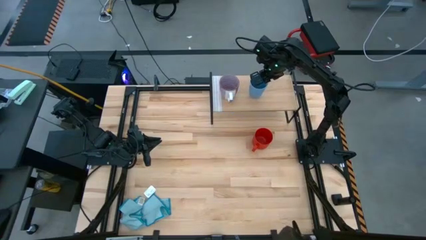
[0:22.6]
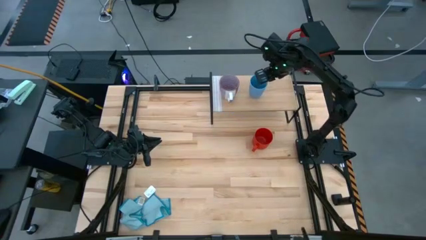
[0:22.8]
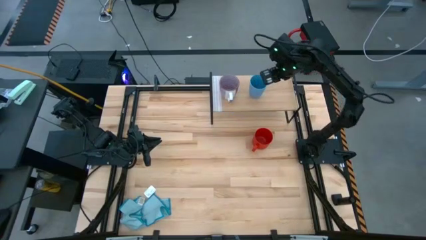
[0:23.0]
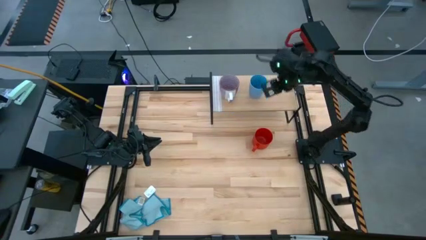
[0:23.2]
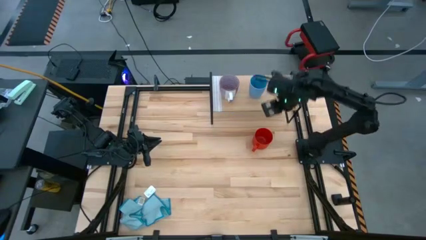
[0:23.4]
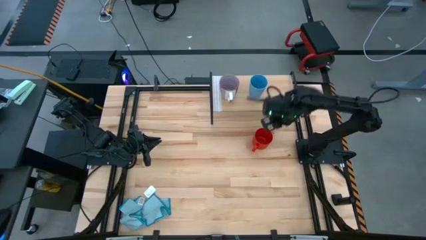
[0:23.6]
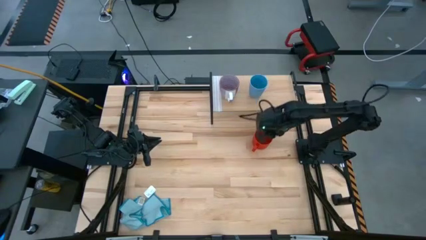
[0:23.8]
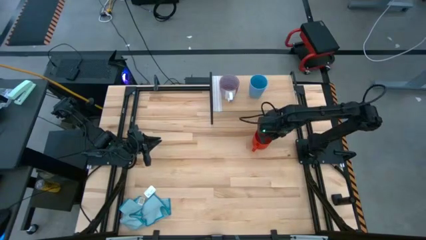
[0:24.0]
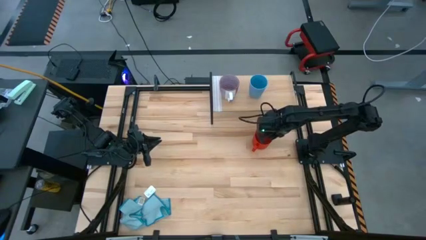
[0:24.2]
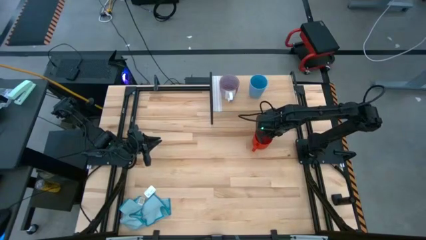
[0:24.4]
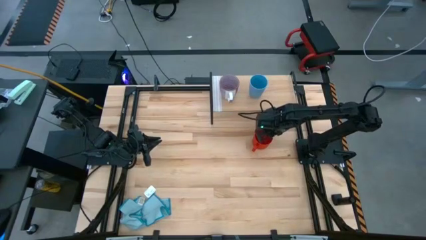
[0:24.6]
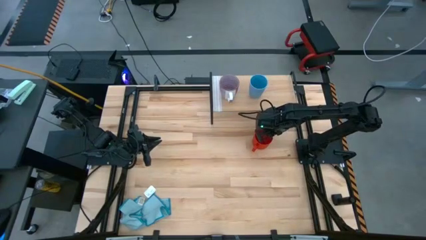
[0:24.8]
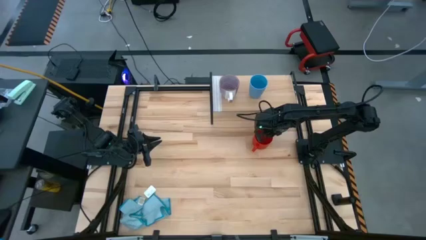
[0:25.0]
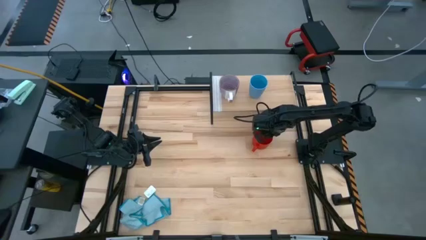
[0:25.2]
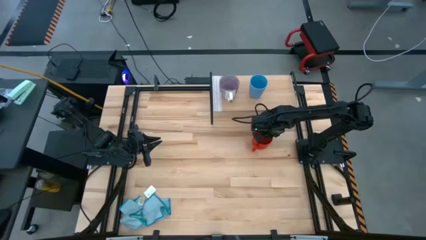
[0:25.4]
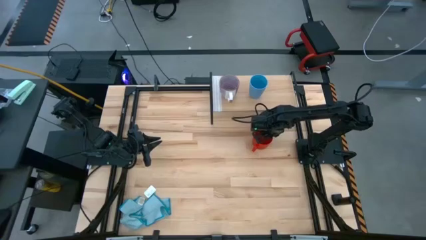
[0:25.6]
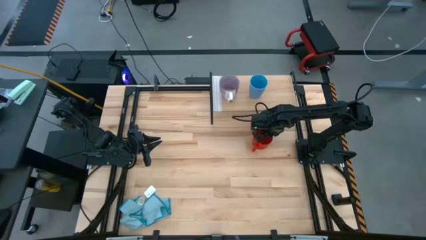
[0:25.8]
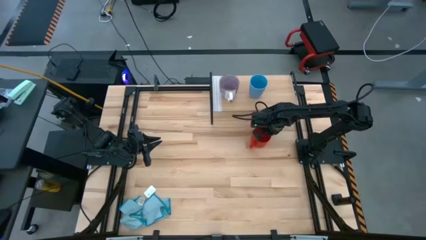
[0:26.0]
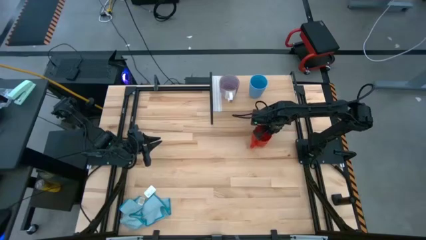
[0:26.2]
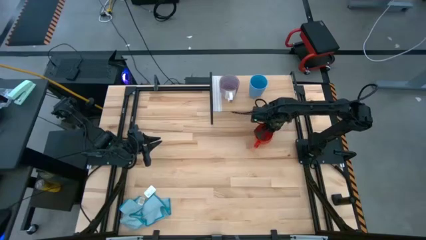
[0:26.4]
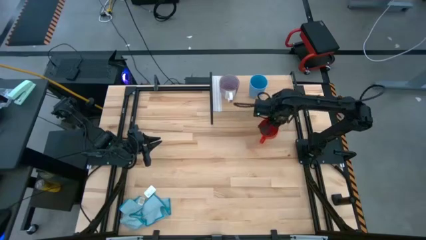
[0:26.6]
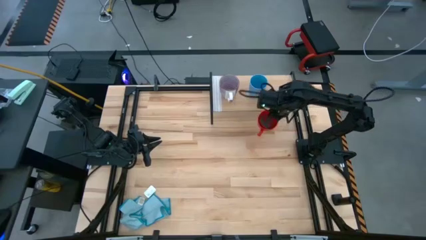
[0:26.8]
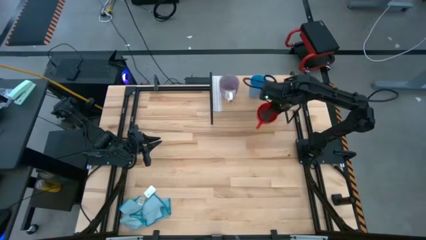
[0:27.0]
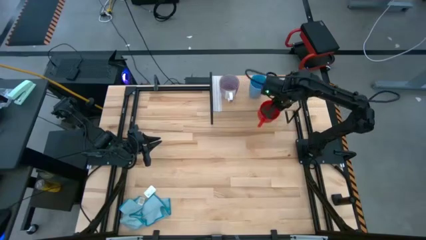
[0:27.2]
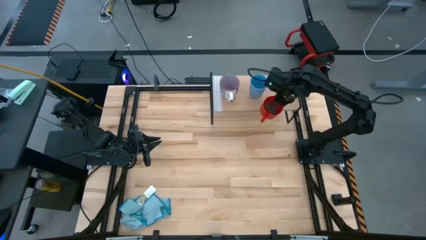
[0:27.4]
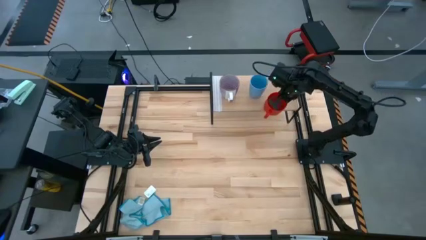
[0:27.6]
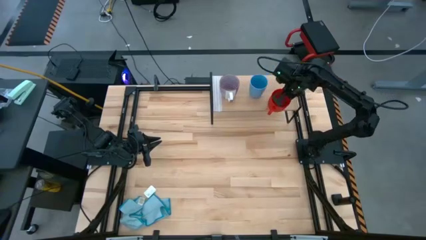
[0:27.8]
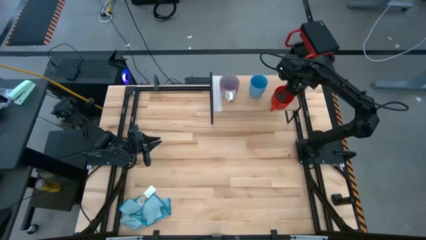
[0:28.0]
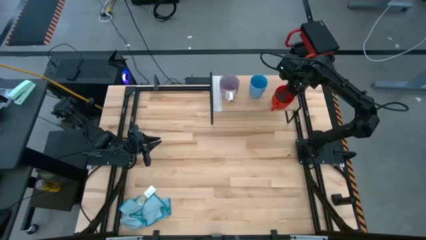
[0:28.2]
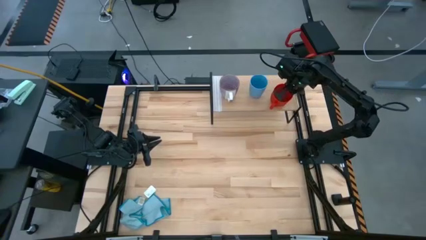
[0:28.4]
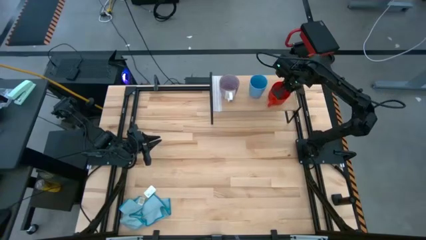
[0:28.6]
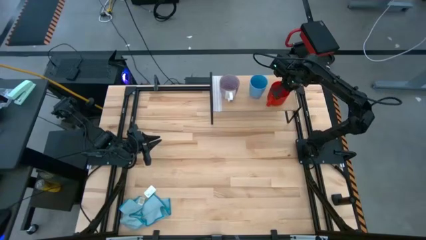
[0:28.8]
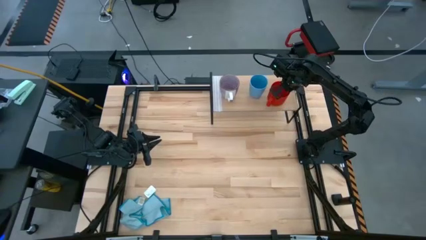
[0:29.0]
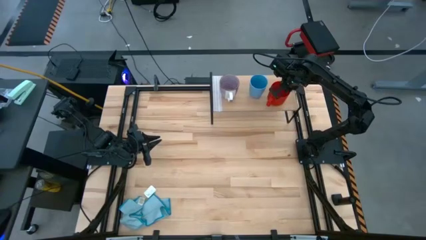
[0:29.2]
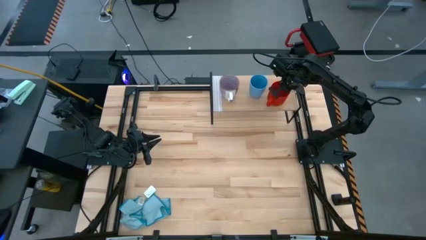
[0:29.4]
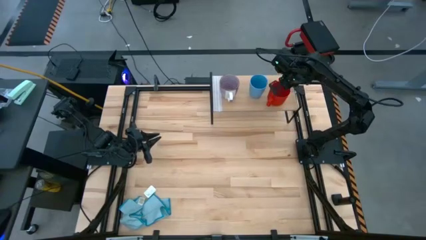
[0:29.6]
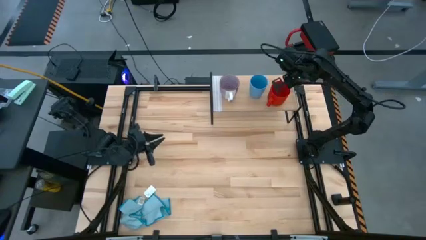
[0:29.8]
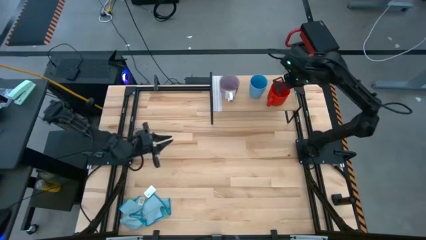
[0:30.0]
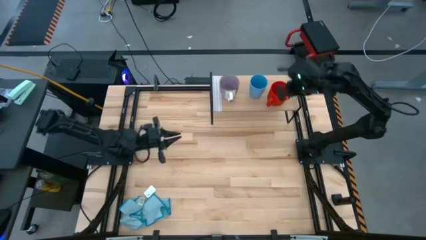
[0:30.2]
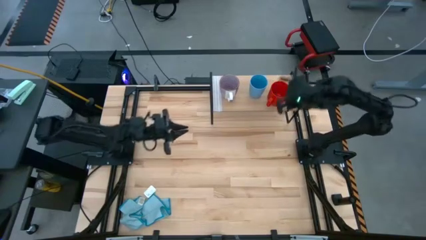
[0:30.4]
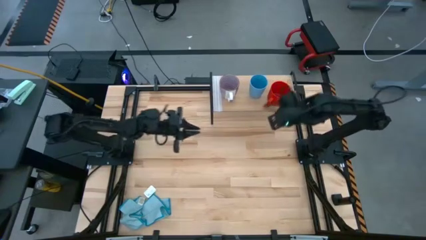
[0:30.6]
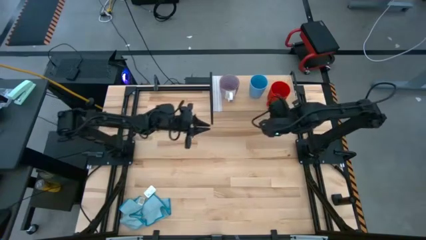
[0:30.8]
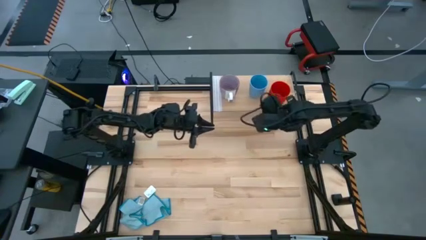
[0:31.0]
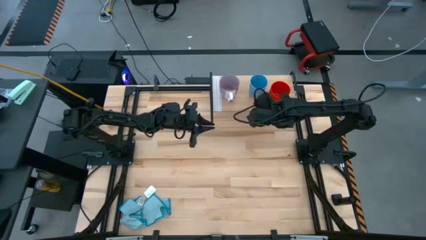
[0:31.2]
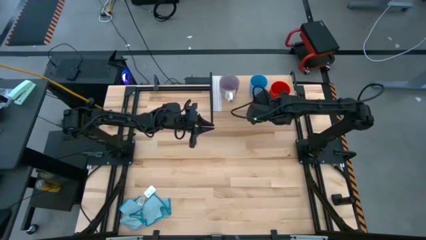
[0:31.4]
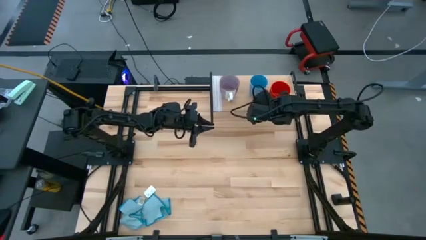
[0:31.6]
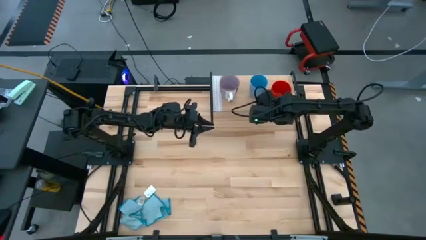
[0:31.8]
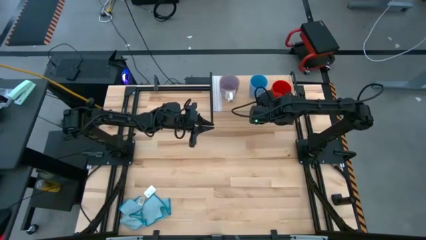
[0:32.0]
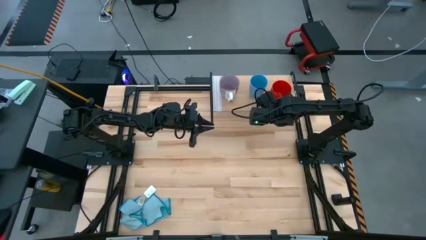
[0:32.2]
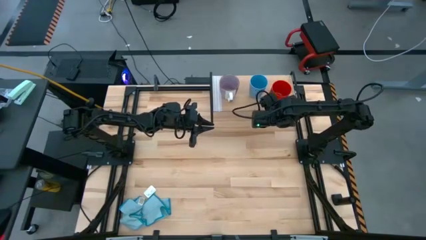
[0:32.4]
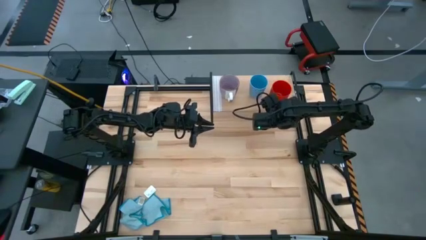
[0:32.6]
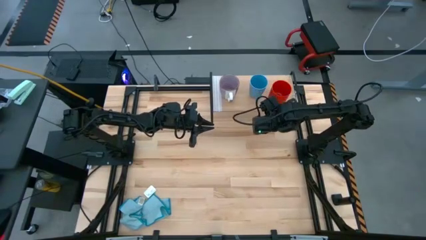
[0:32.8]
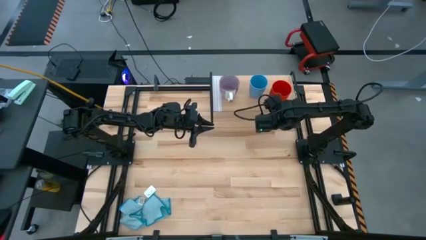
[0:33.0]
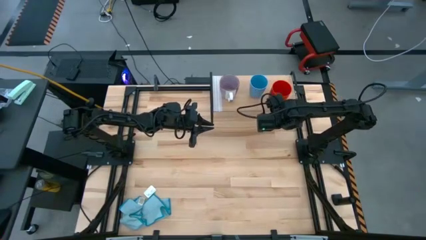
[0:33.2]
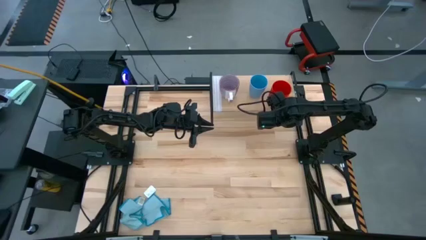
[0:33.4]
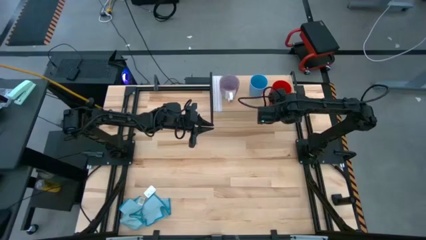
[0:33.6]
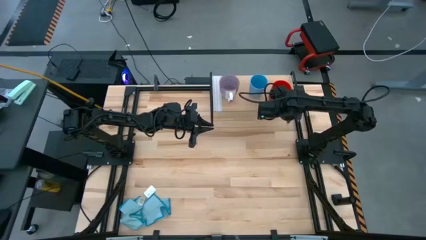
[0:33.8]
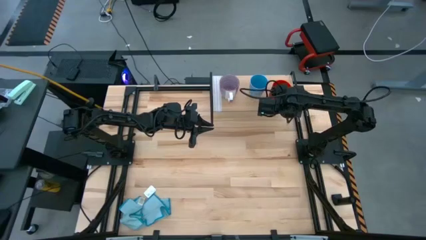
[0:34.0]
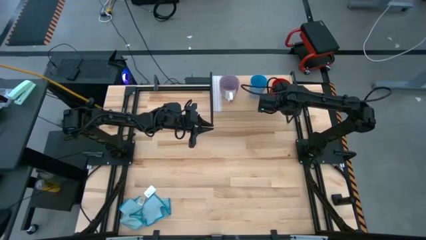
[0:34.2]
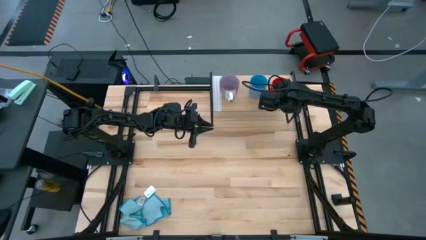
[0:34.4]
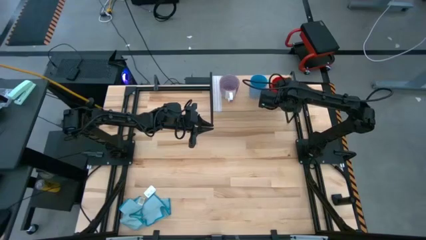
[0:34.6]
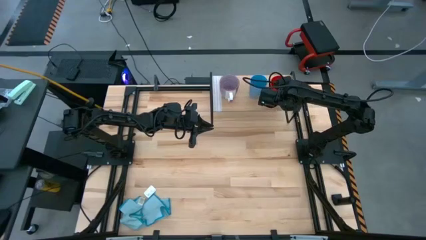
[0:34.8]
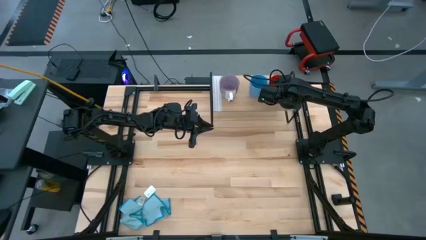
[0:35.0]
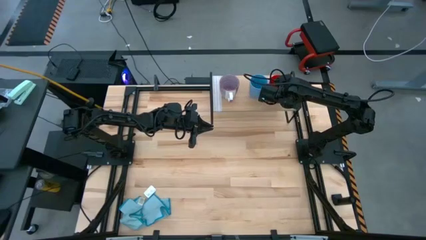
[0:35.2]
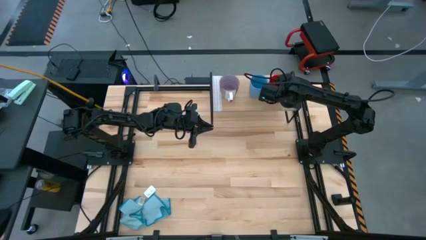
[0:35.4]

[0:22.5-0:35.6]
Task: Stack small to large cups/mugs on shelf
Put the orange mug on the shelf

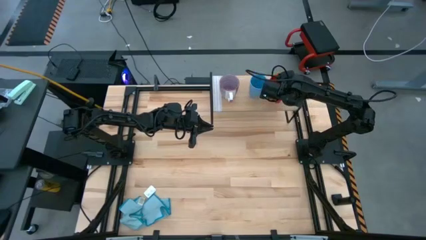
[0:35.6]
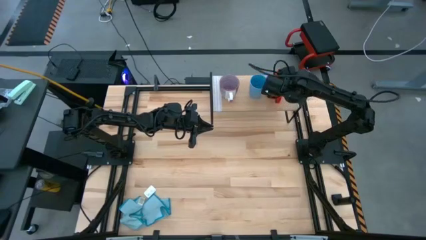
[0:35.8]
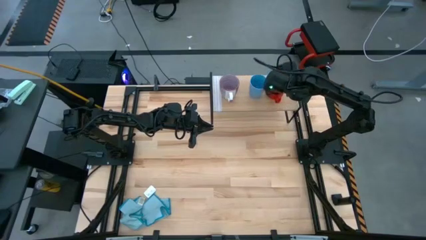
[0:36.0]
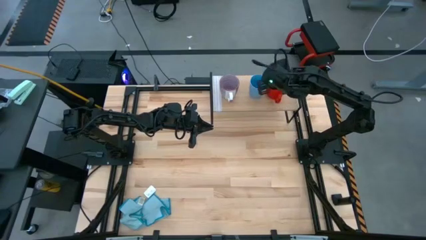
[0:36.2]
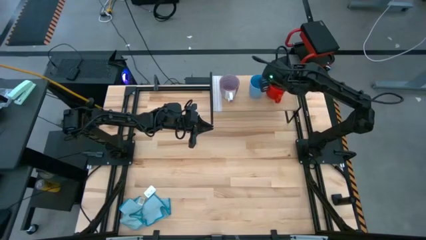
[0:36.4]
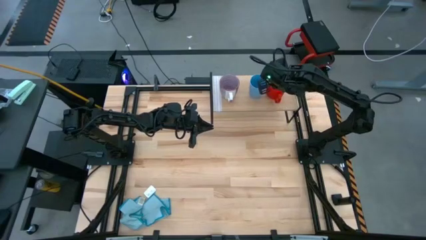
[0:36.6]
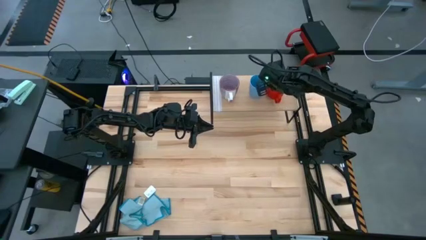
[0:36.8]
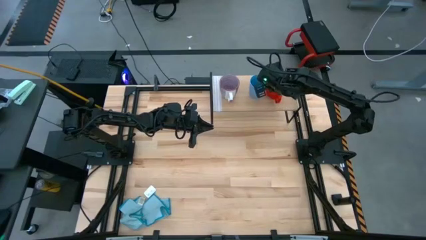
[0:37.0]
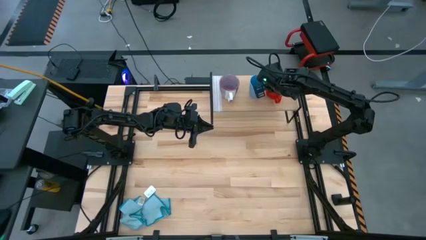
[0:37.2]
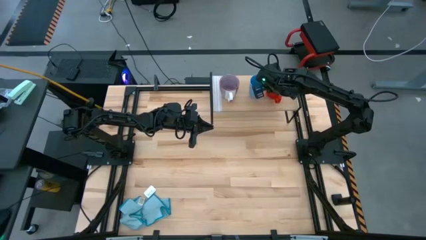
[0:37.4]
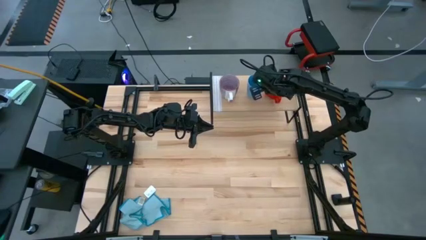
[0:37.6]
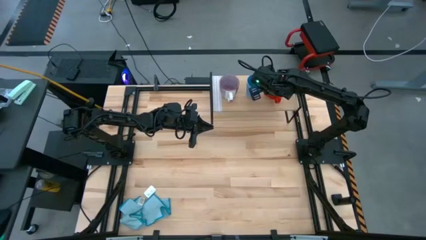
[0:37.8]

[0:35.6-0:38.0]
Adjust the blue mug on the shelf
